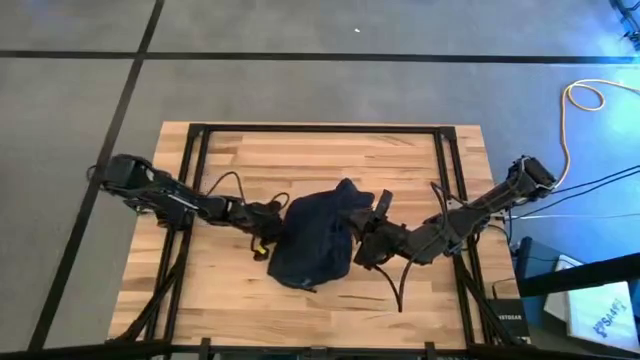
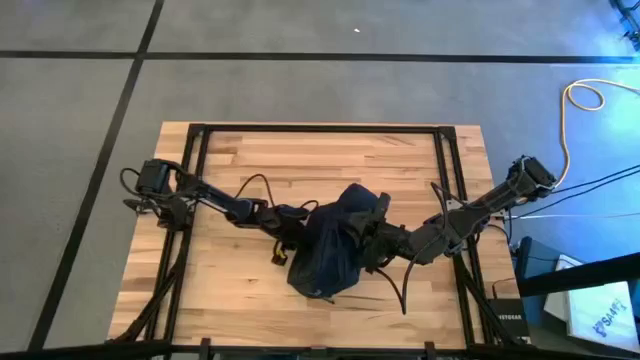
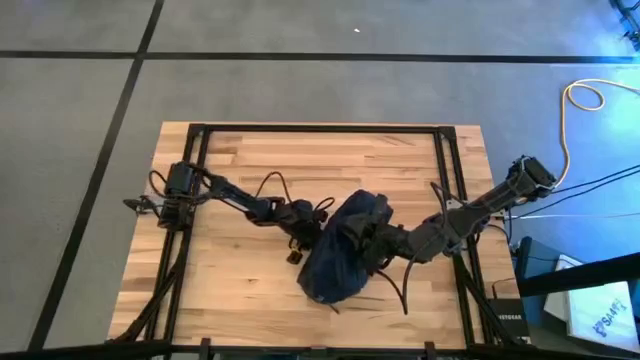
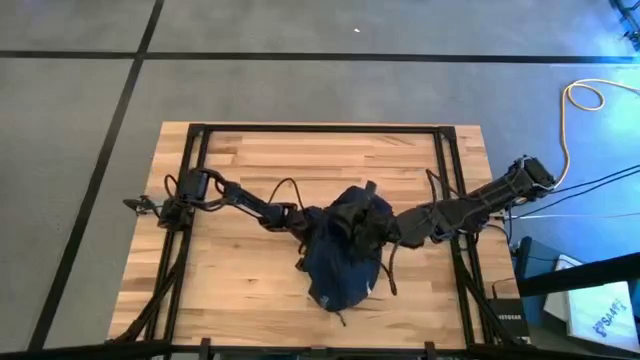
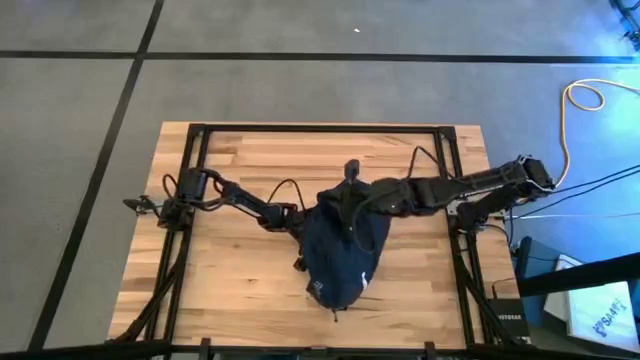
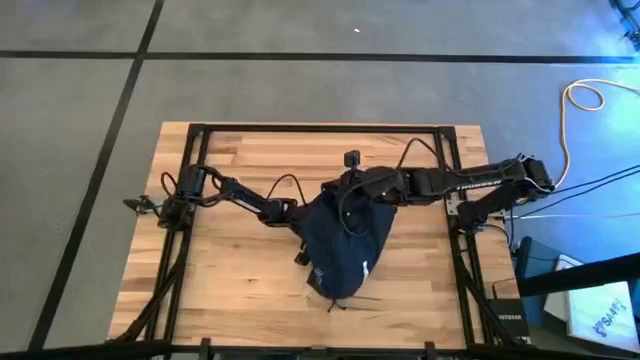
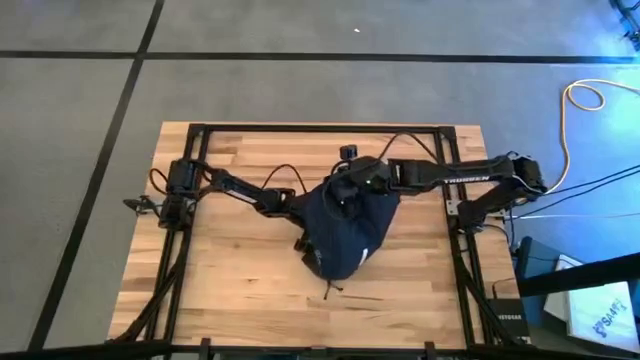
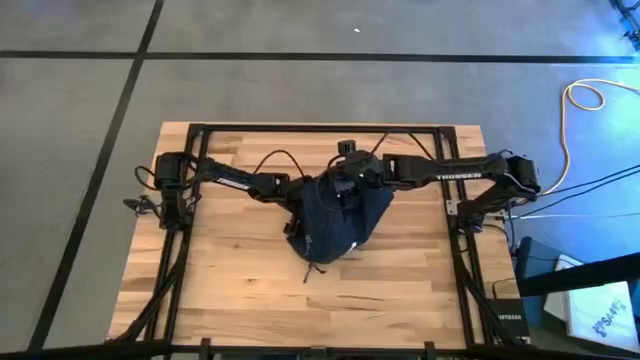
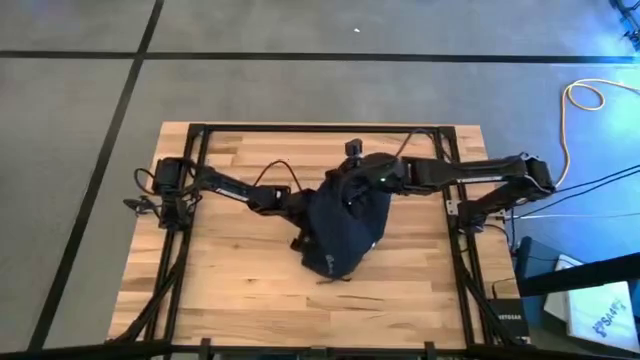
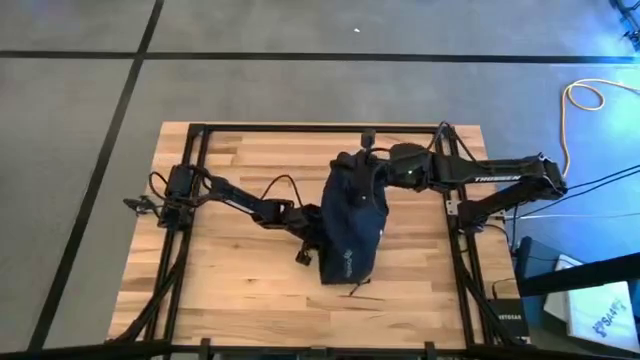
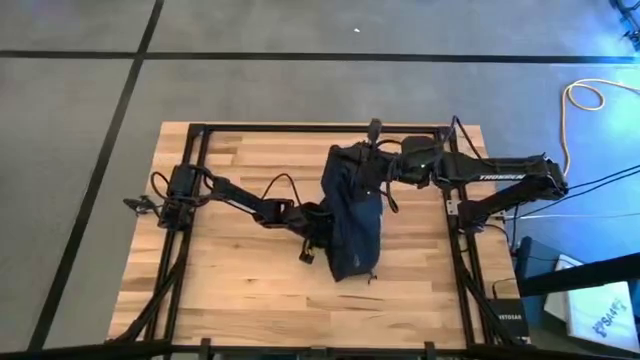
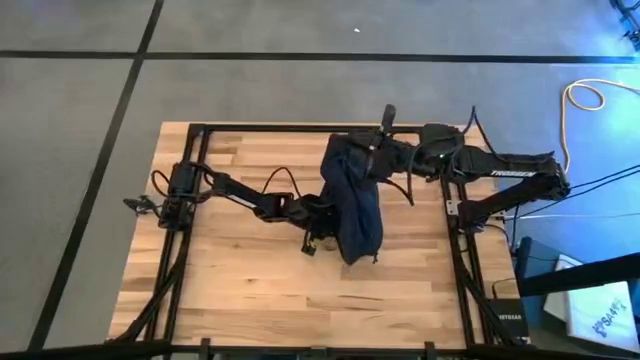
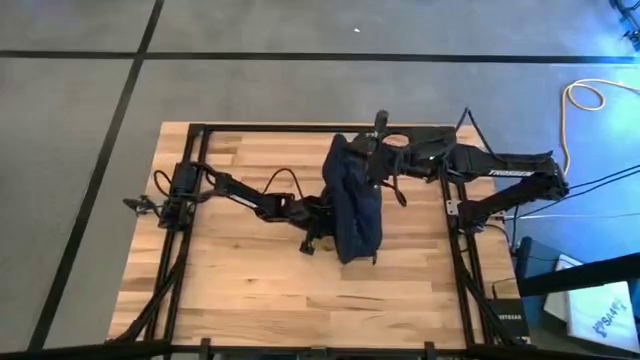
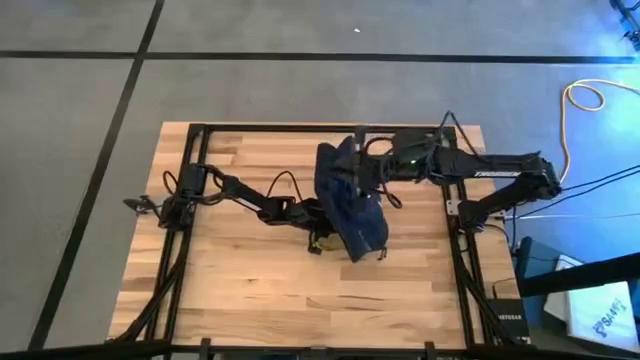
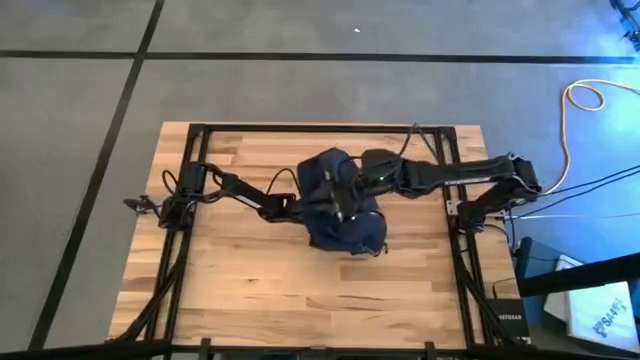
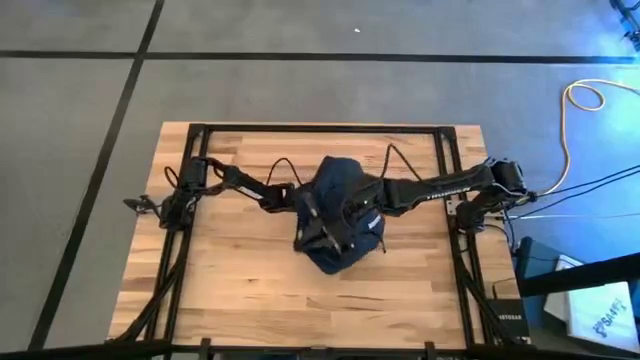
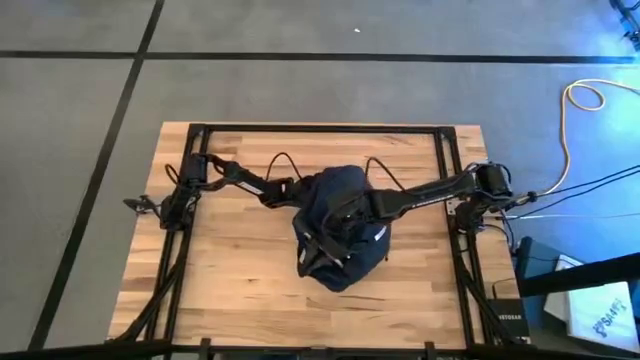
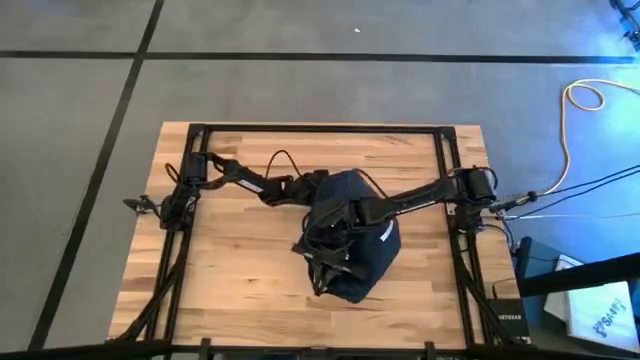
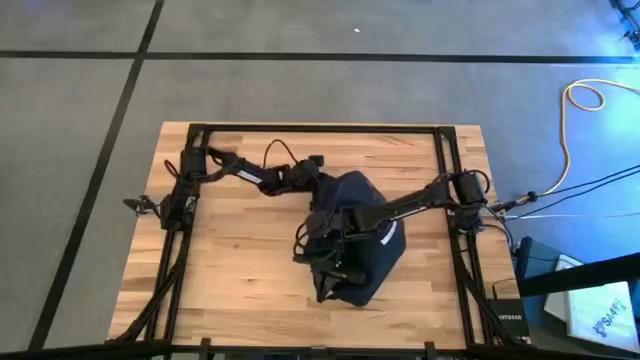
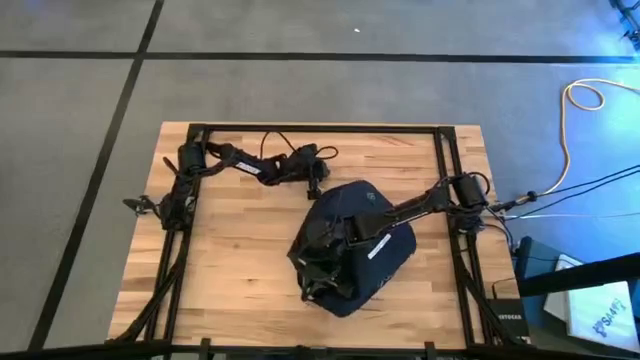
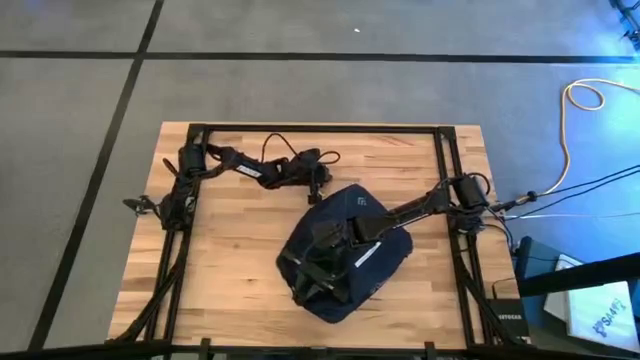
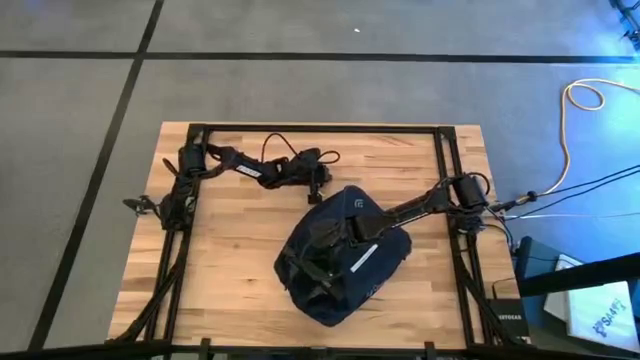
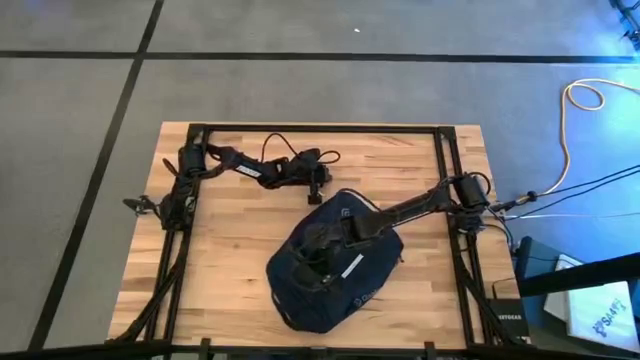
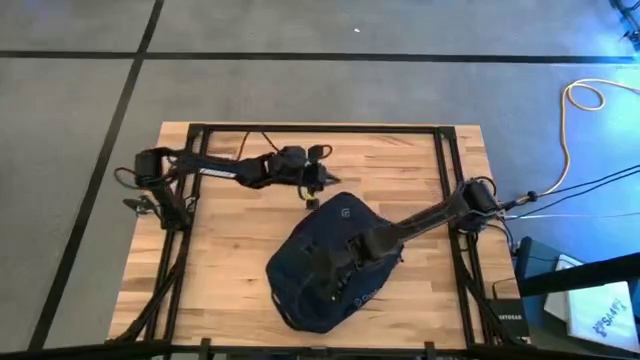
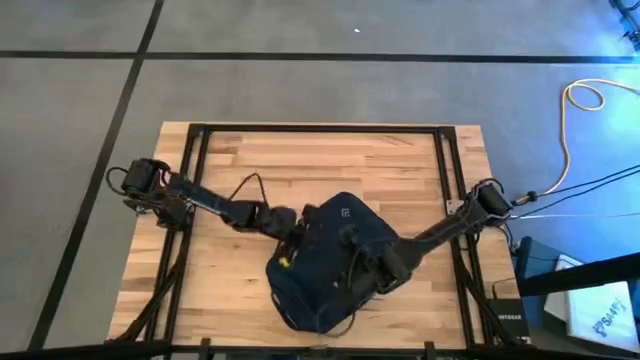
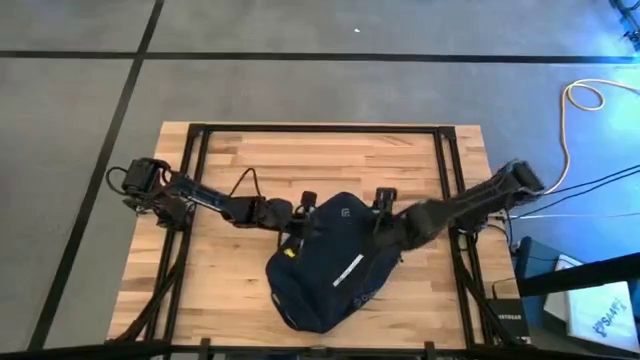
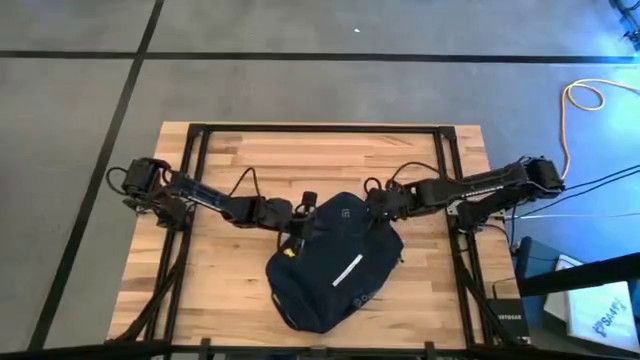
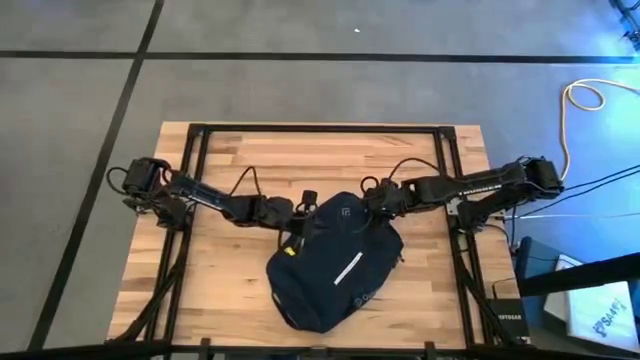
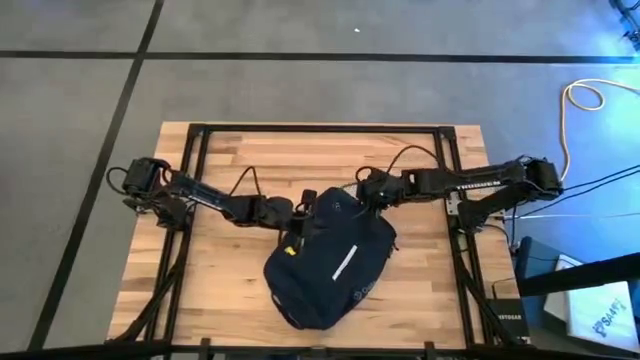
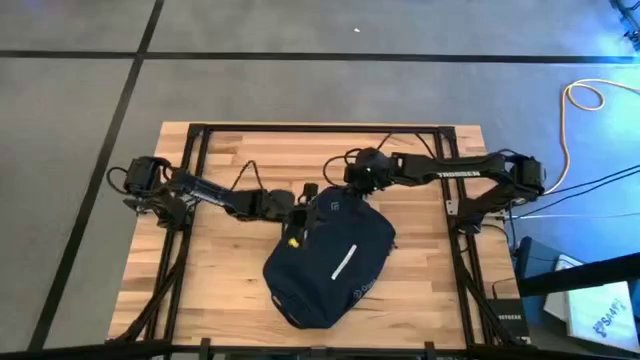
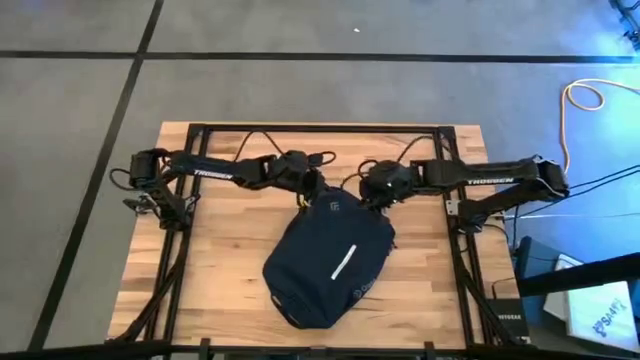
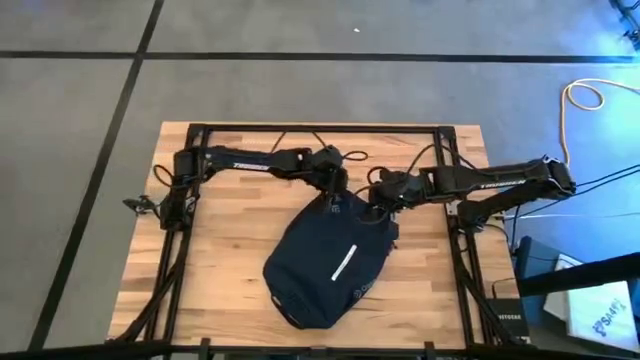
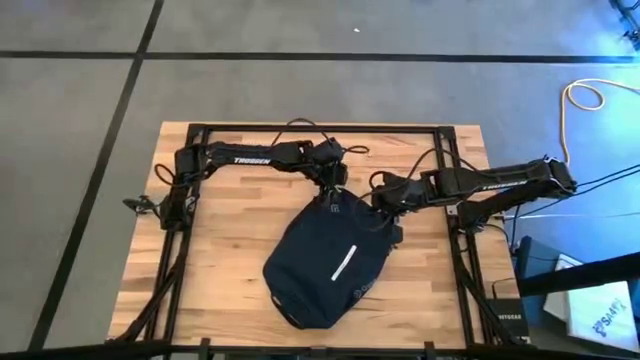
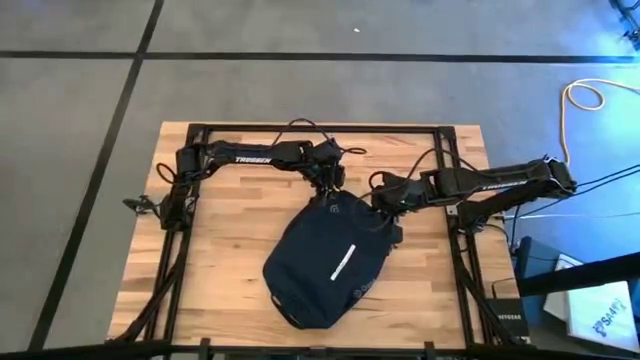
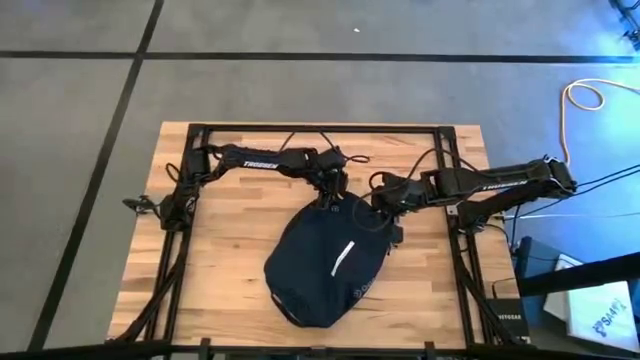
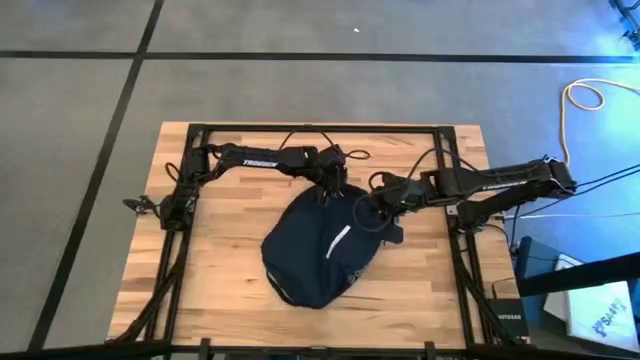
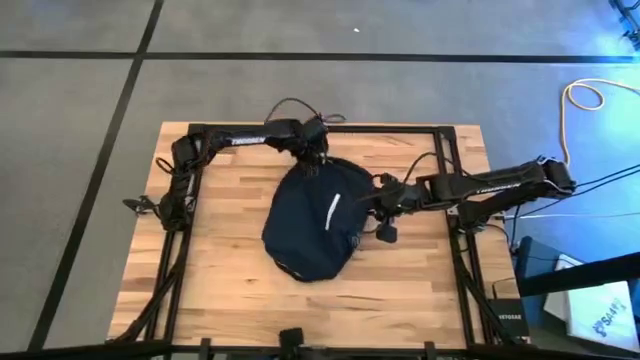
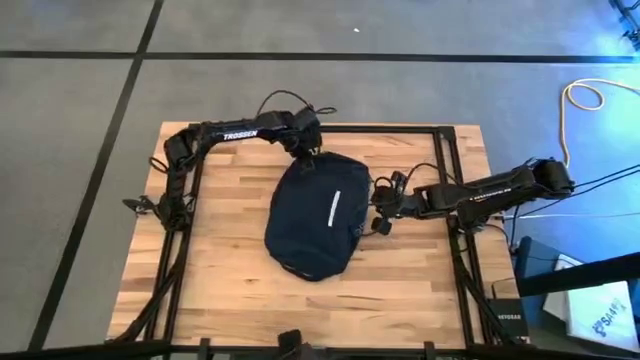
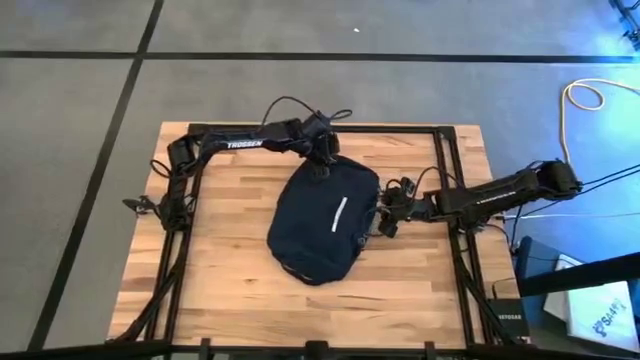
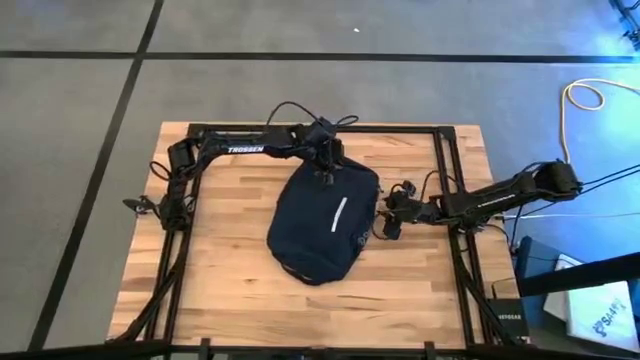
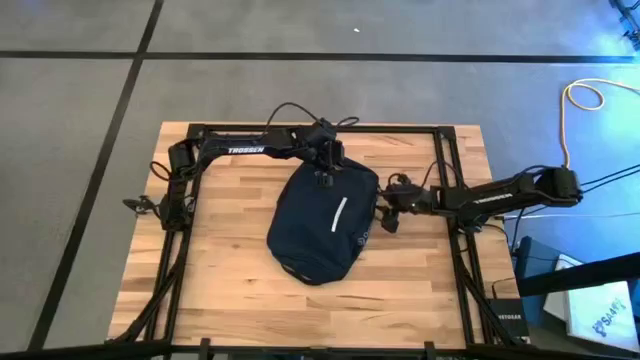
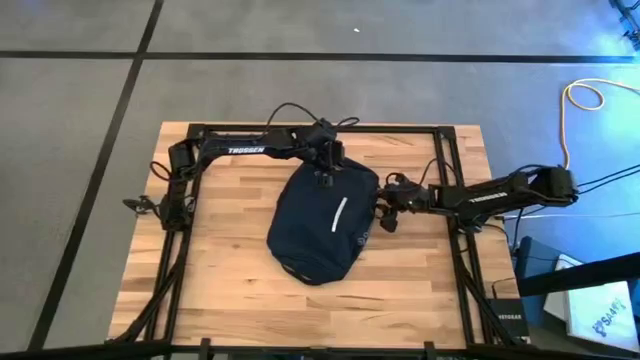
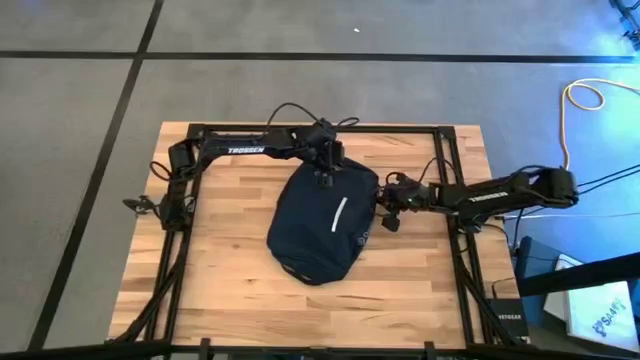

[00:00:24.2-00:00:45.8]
Task: Unpack backpack
Open the blue backpack
